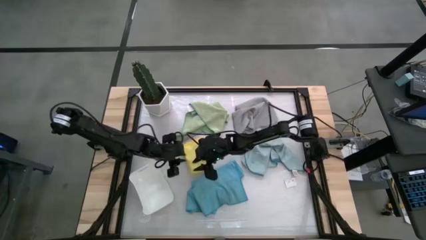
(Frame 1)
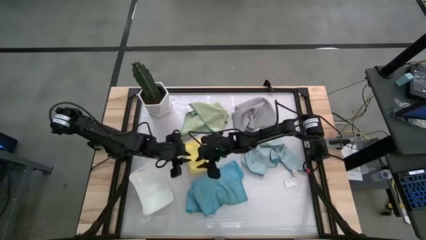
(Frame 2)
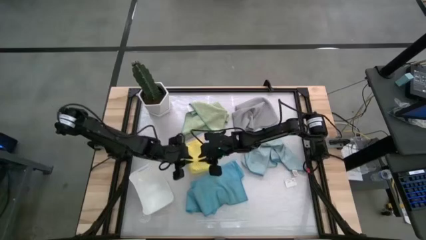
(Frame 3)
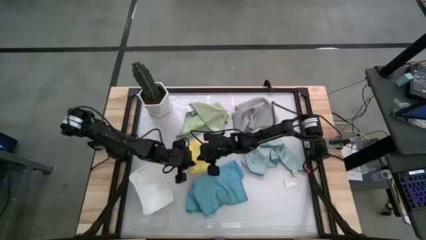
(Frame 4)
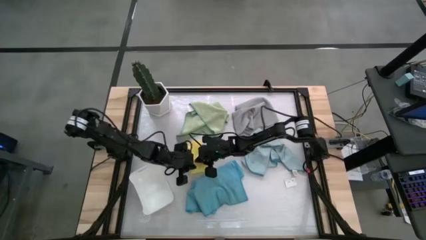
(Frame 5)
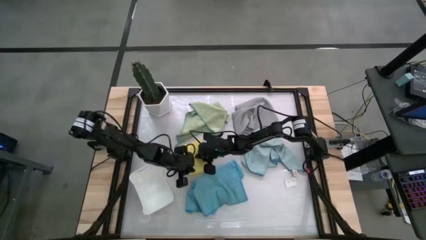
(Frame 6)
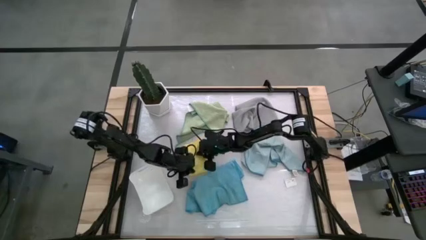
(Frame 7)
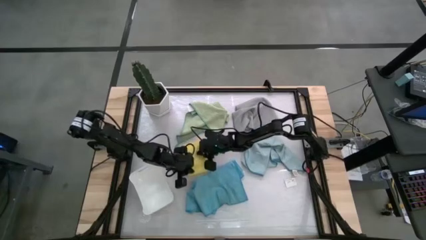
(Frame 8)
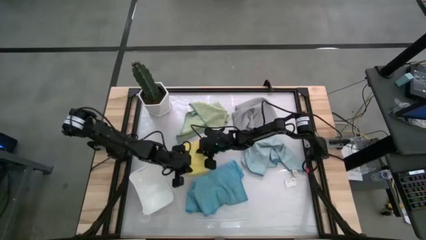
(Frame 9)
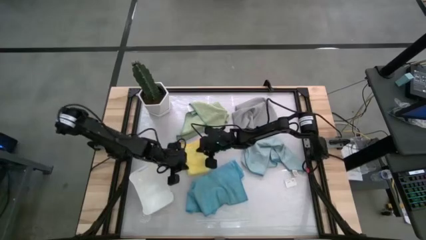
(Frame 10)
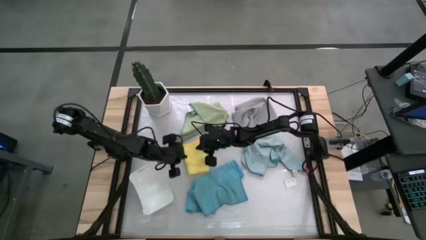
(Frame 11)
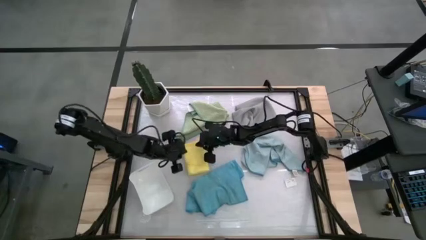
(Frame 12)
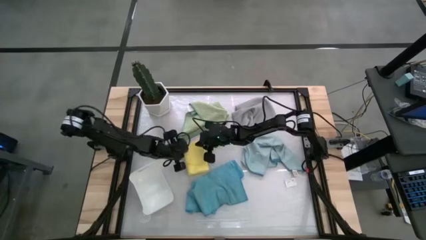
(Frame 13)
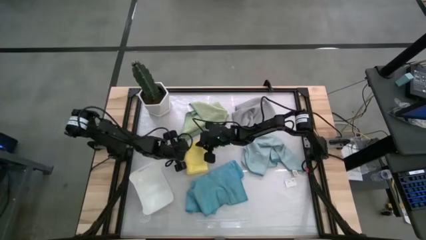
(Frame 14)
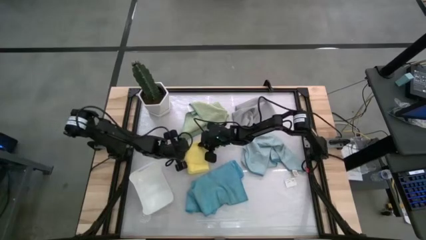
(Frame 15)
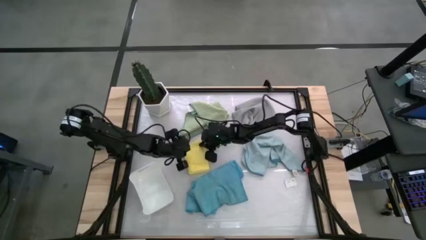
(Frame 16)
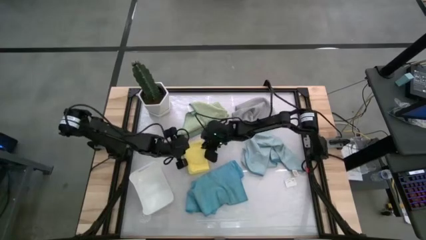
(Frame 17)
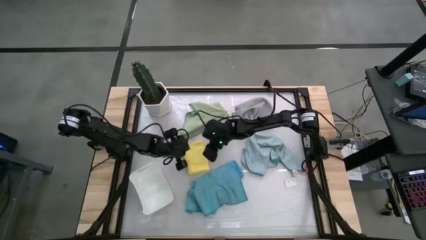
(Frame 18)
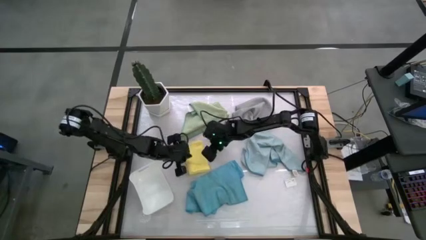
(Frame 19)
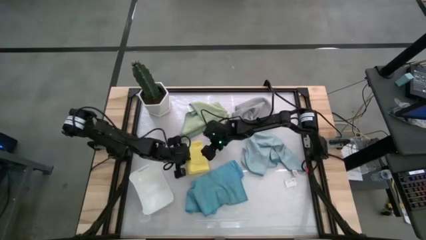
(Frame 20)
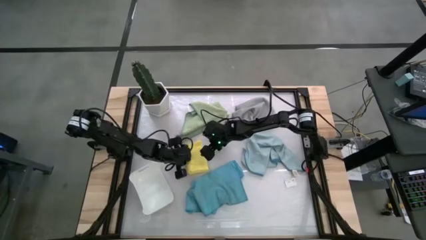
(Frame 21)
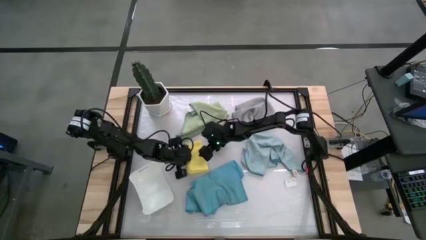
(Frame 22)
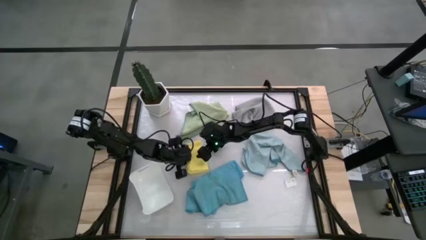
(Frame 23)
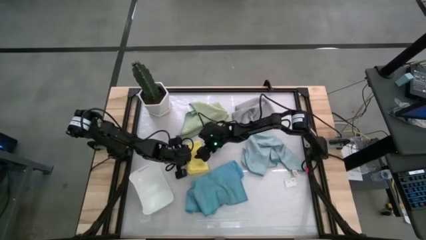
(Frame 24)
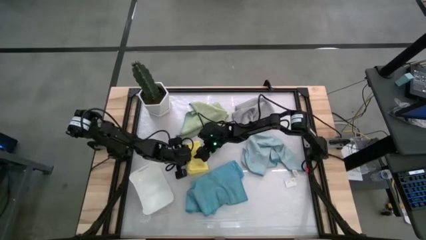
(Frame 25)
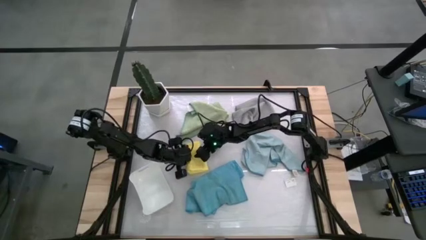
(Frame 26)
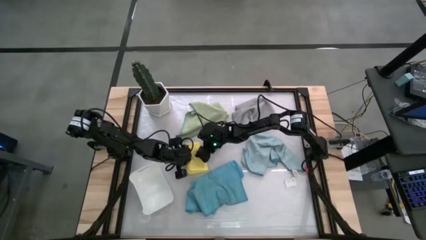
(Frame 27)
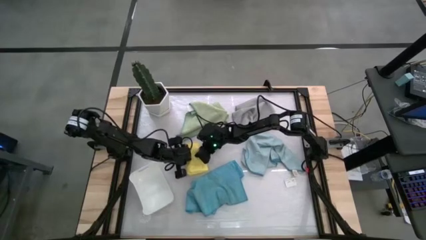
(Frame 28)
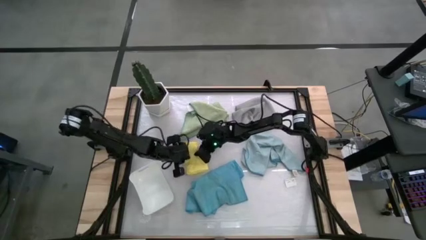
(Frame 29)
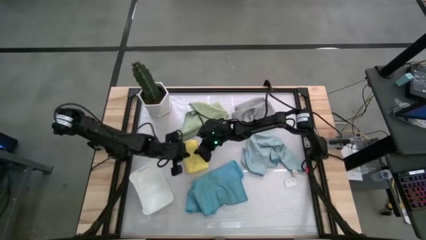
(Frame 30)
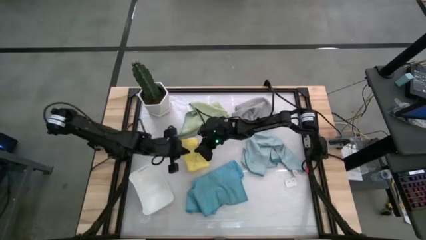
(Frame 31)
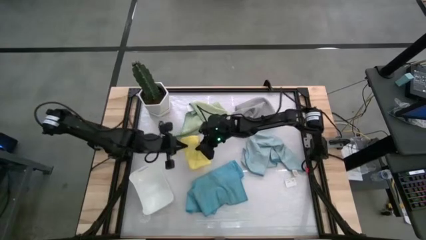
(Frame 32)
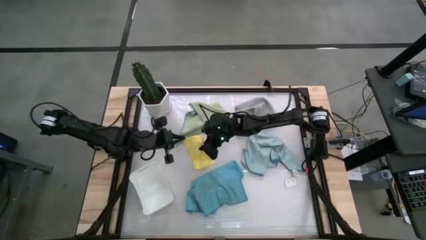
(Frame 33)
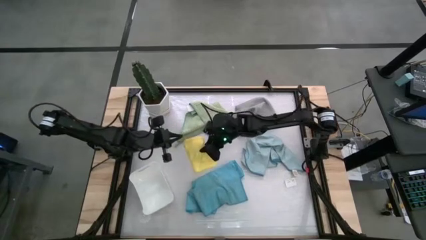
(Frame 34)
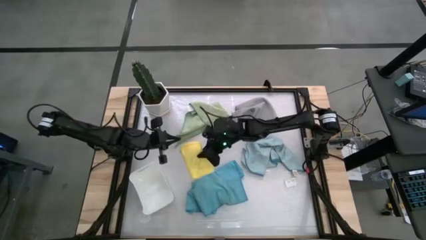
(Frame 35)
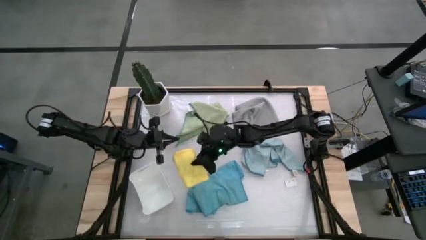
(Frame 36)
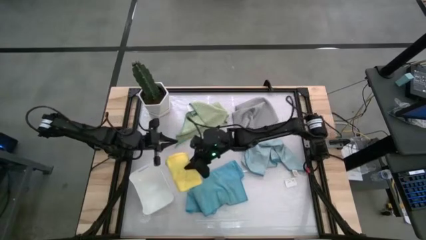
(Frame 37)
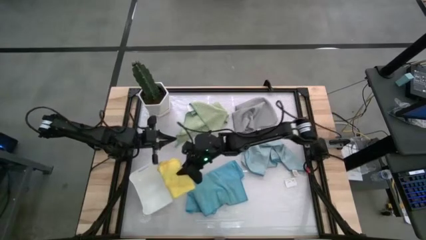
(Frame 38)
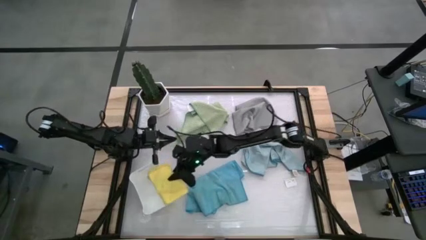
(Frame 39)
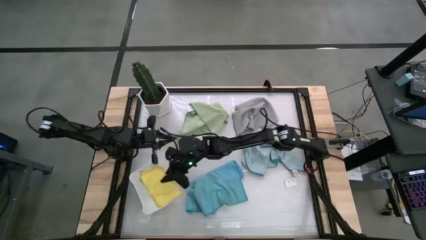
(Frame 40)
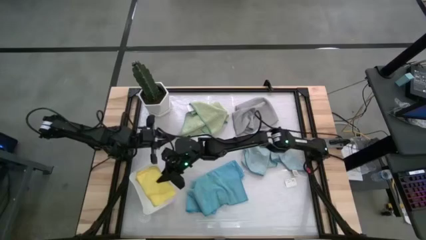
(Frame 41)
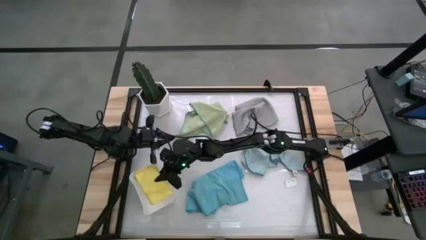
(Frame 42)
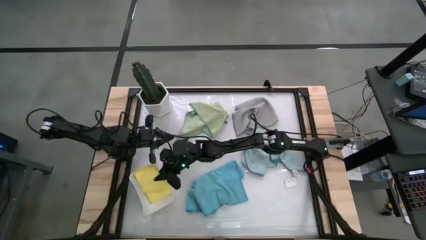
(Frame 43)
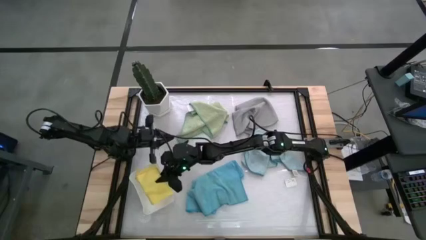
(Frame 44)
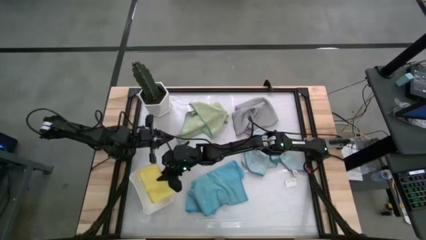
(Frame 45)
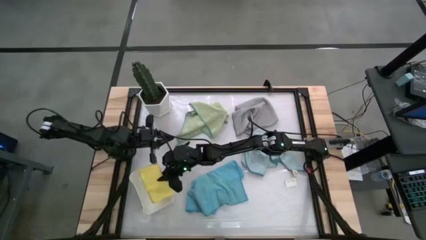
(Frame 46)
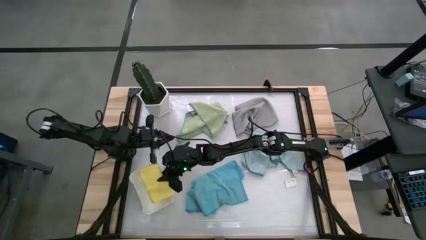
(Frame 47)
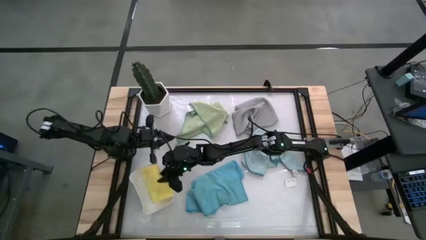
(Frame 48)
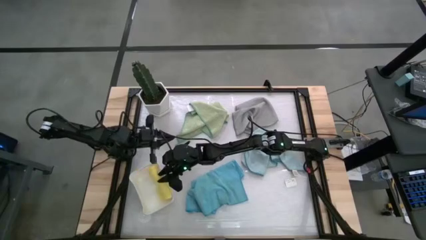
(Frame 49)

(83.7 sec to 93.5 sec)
Task: Fold microfiber towels
Put the yellow microfiber towel into the white bin

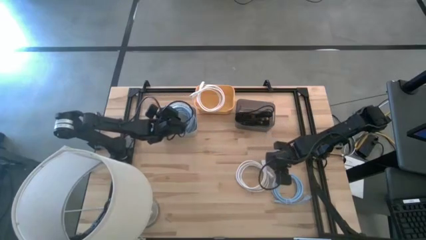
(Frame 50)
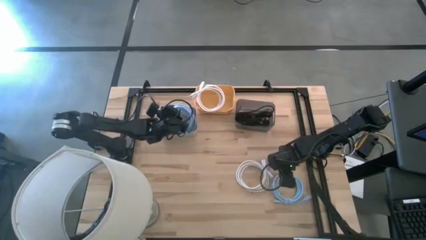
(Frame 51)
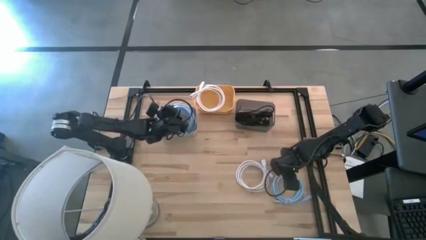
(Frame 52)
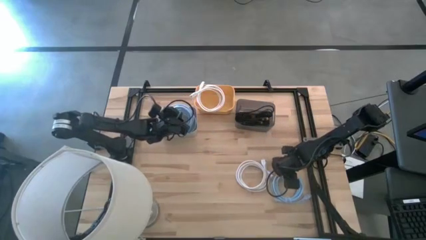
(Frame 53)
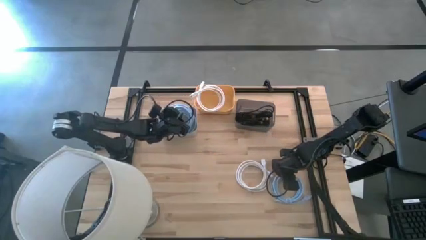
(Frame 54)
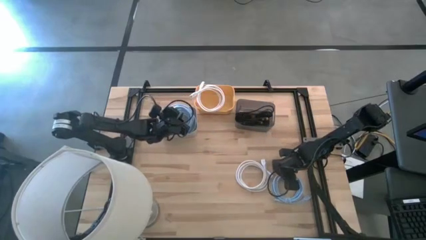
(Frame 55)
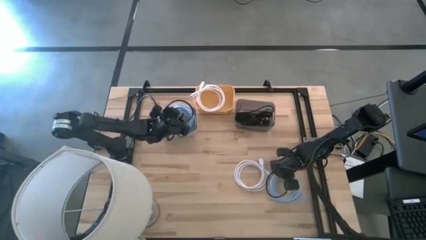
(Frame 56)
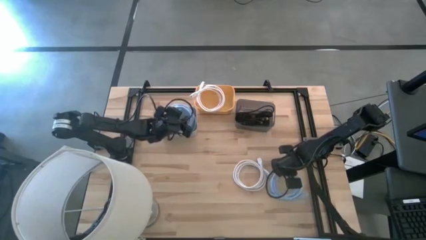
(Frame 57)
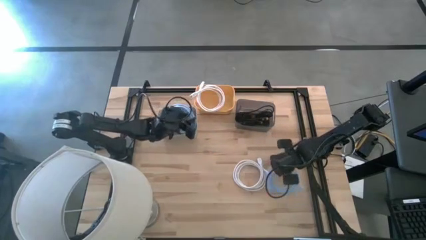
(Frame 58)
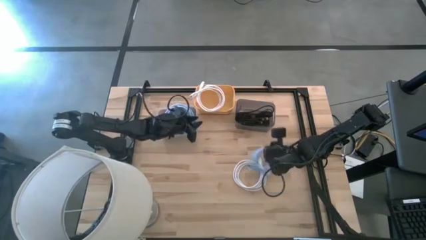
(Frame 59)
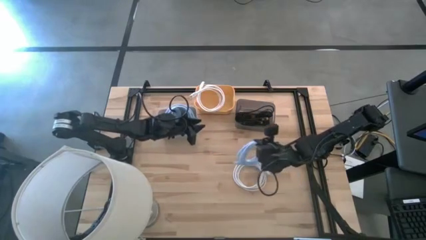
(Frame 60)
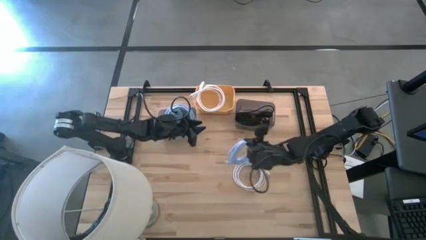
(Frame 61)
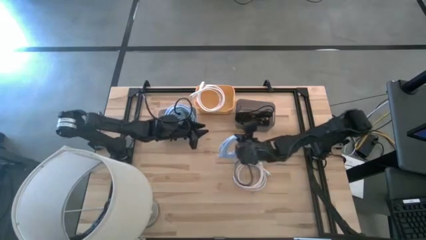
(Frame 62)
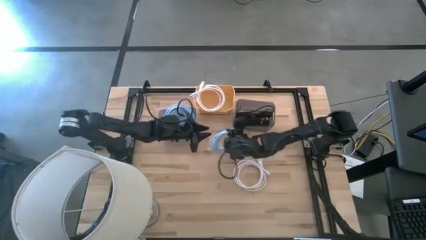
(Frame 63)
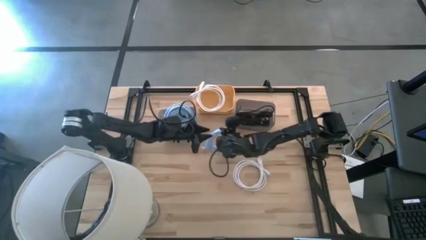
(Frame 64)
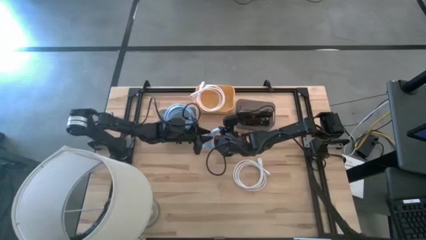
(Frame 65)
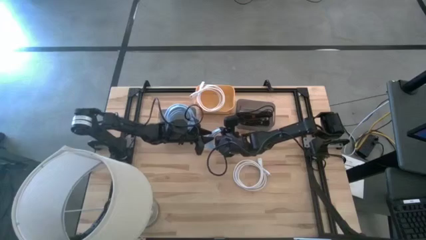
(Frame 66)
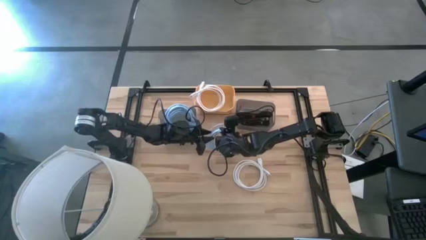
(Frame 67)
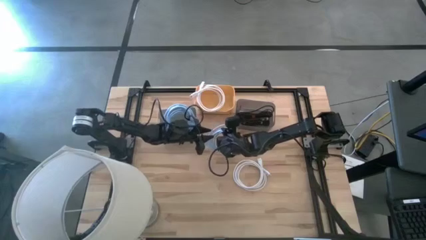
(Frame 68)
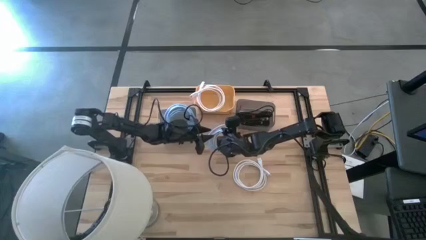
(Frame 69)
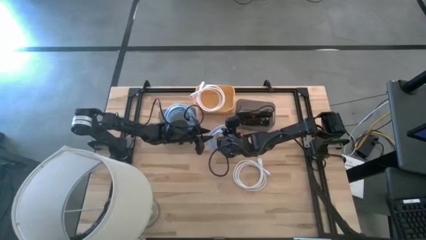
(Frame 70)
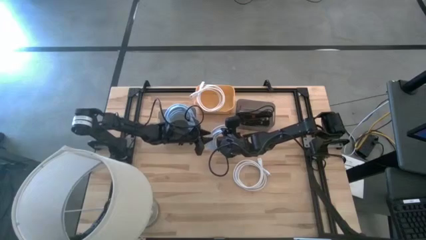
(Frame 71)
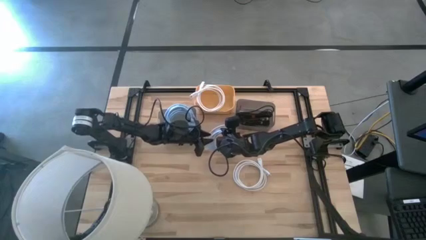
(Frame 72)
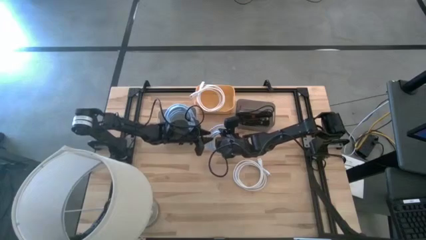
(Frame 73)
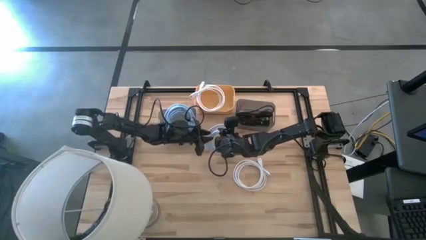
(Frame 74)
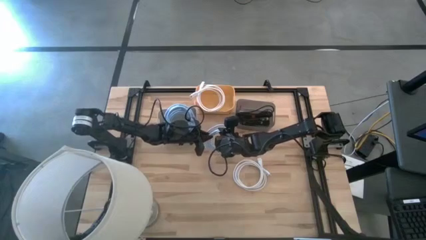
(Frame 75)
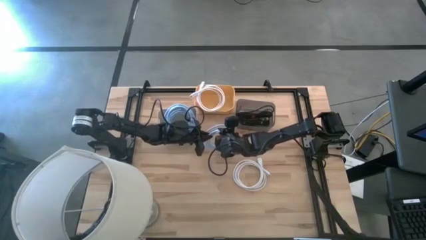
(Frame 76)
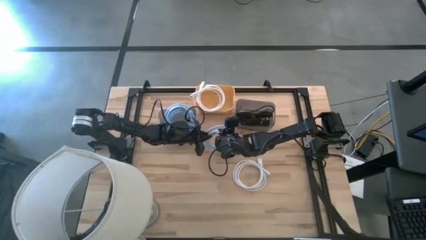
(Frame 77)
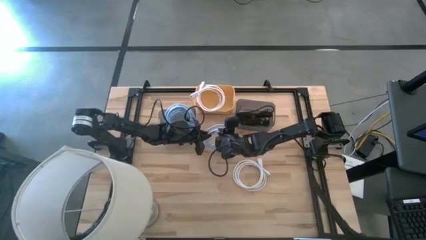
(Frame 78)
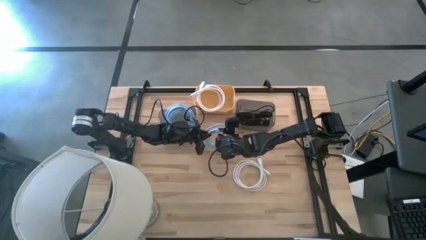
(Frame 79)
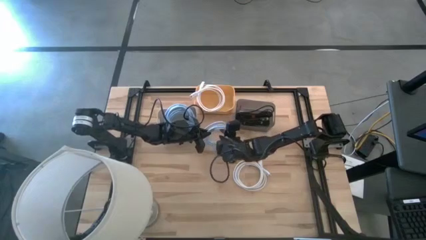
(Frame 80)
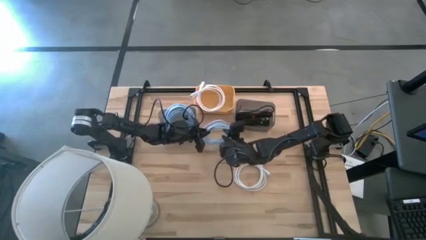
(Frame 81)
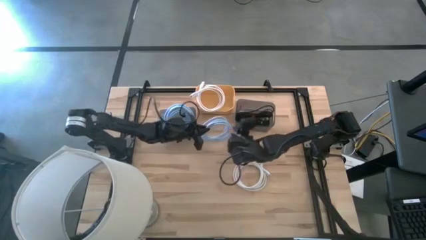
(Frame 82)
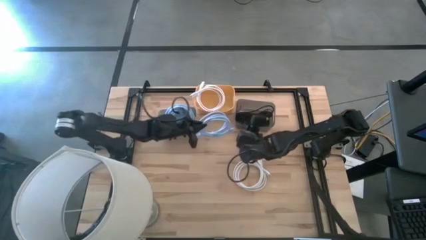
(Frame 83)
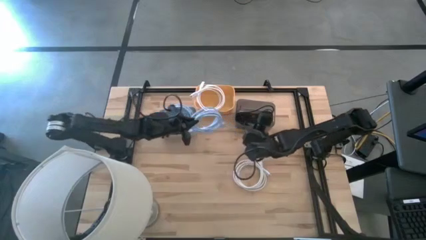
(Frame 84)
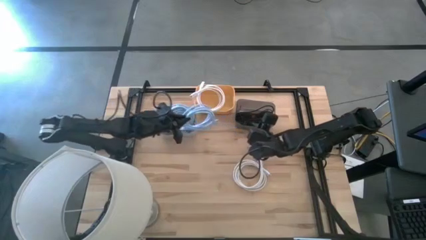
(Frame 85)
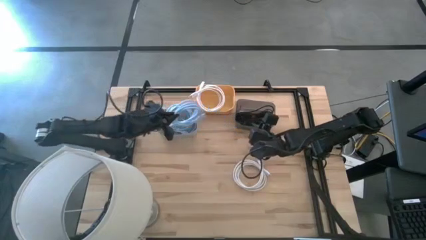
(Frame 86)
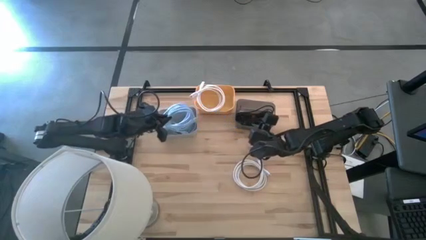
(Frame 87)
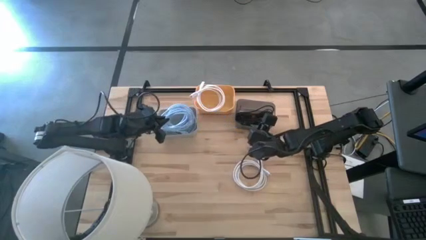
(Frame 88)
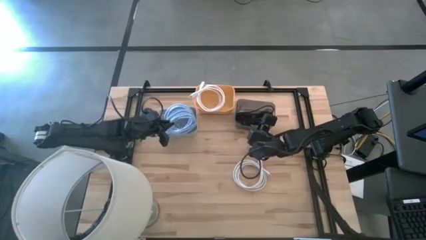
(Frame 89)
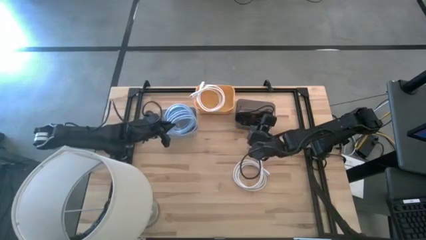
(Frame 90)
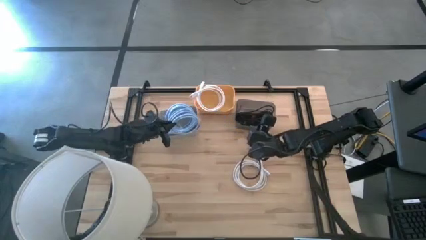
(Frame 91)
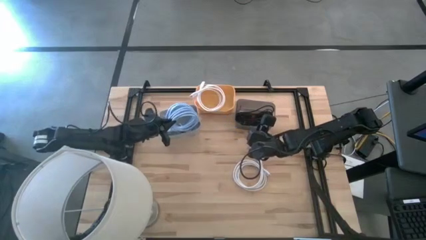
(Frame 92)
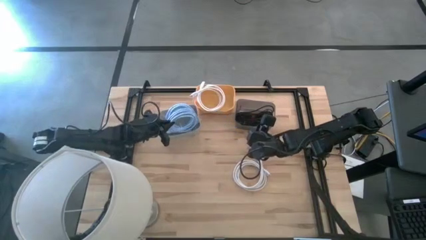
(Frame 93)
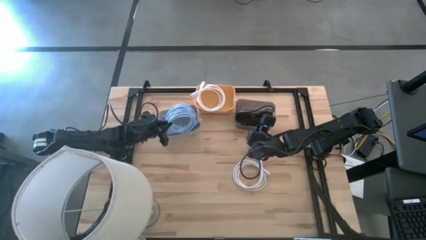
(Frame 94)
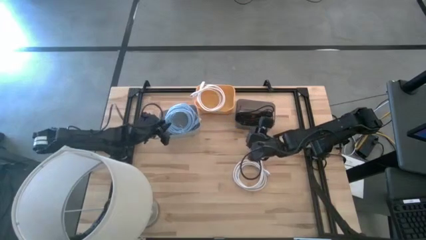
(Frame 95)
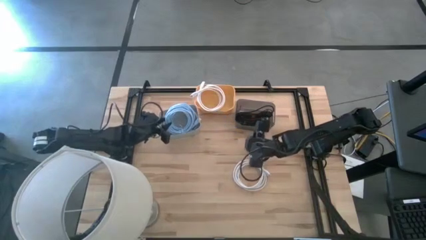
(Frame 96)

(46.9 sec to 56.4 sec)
Task: Pick & Place USB Port
Put the light blue hdmi cable into the gray bin
